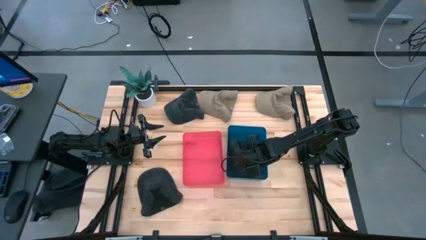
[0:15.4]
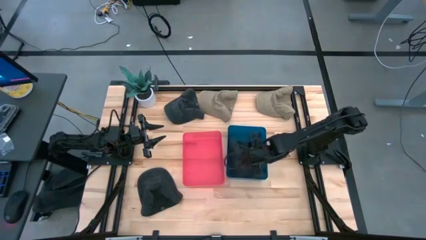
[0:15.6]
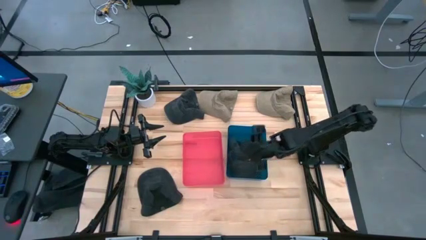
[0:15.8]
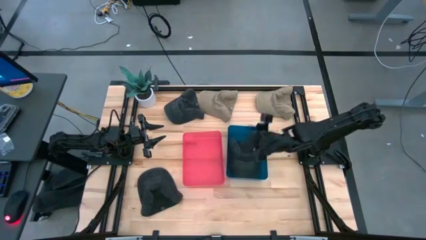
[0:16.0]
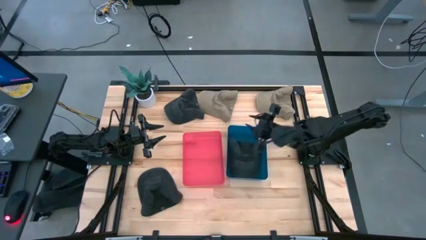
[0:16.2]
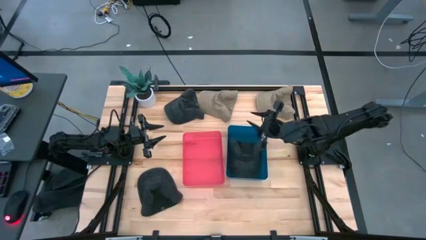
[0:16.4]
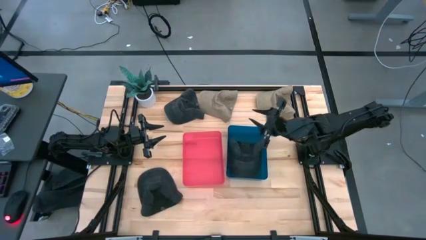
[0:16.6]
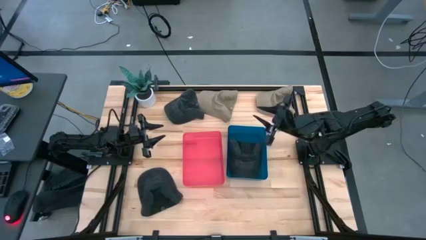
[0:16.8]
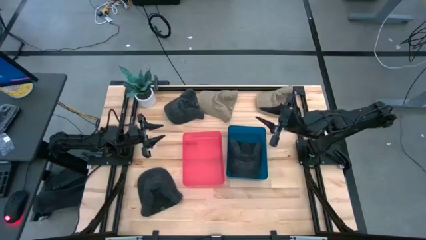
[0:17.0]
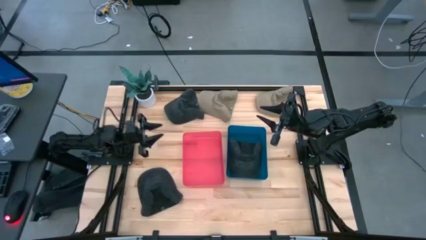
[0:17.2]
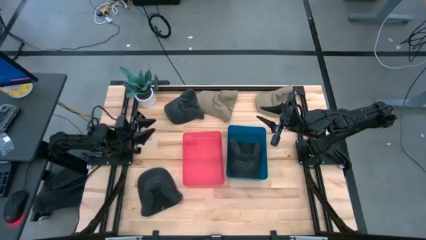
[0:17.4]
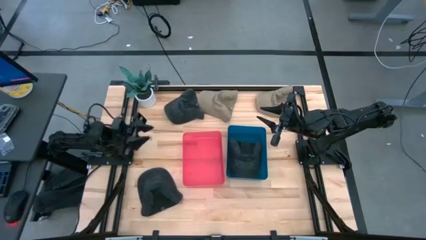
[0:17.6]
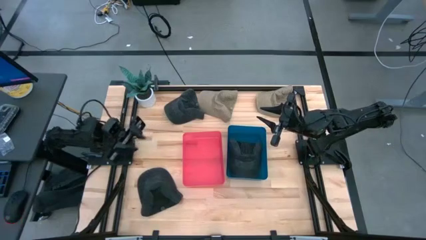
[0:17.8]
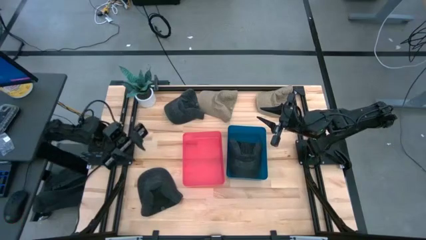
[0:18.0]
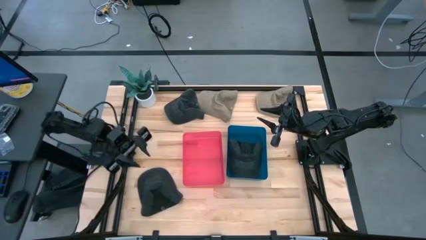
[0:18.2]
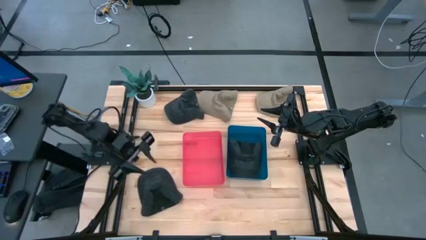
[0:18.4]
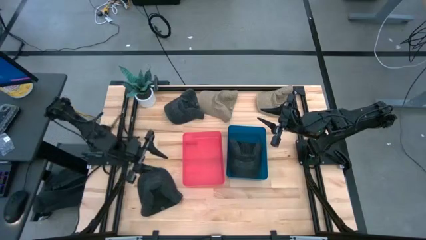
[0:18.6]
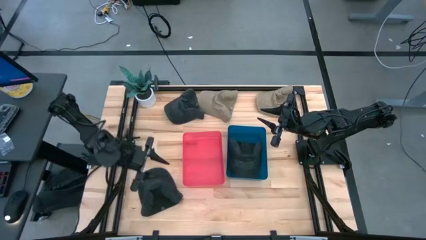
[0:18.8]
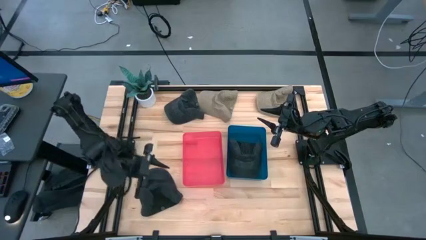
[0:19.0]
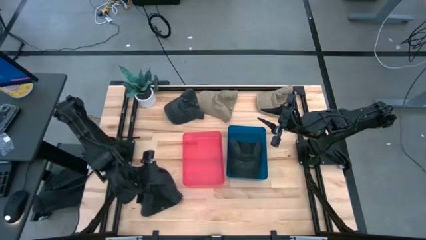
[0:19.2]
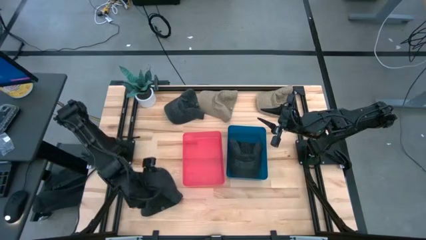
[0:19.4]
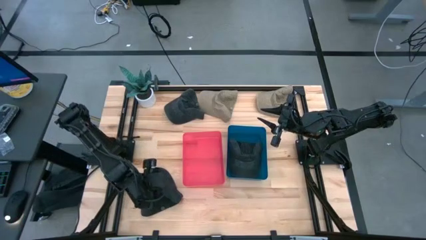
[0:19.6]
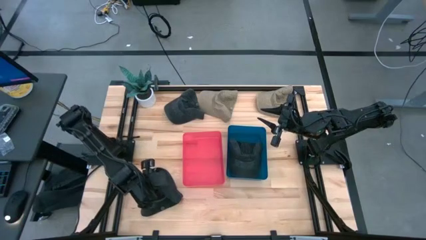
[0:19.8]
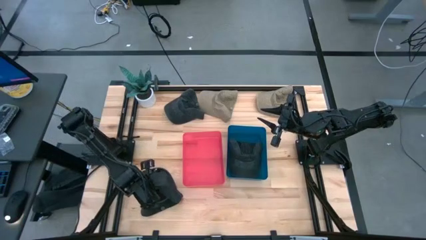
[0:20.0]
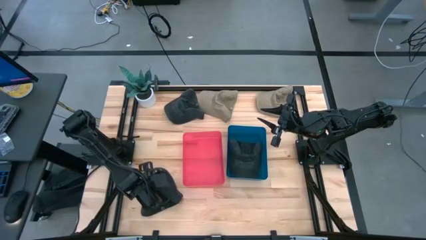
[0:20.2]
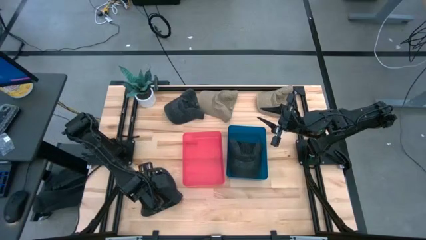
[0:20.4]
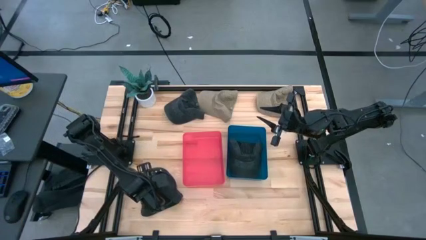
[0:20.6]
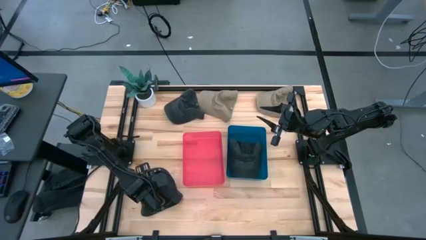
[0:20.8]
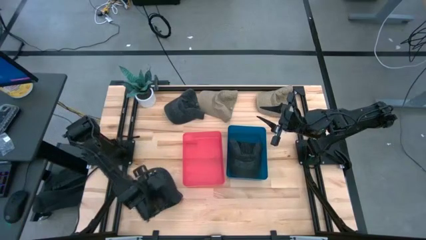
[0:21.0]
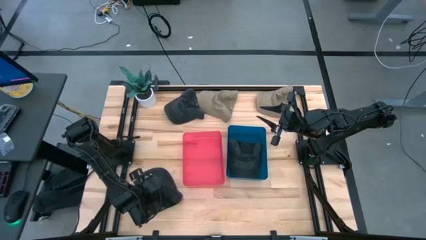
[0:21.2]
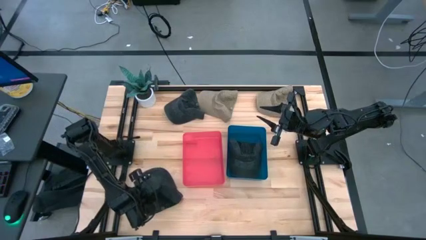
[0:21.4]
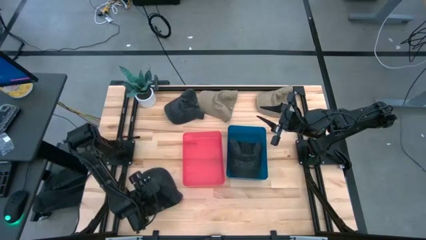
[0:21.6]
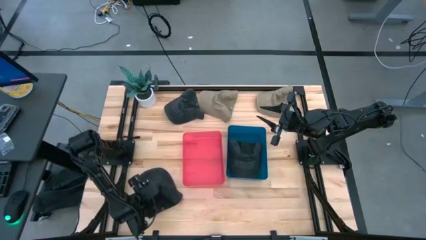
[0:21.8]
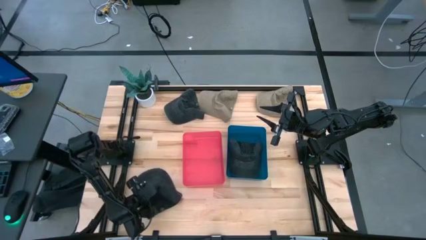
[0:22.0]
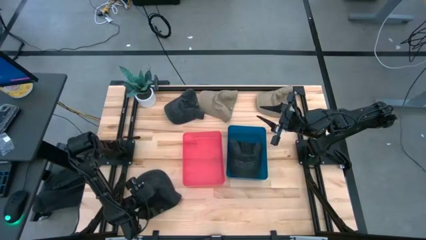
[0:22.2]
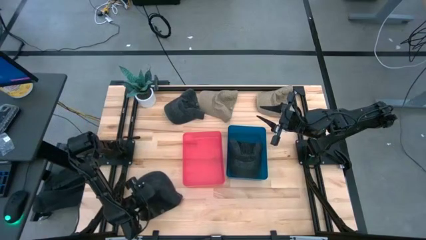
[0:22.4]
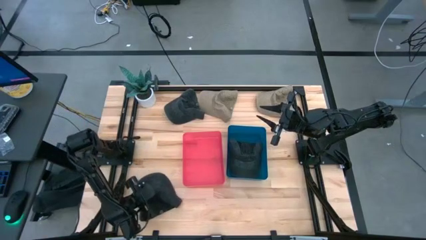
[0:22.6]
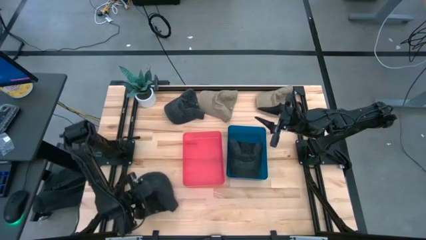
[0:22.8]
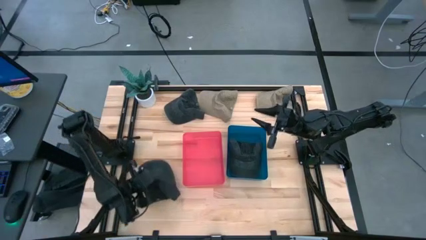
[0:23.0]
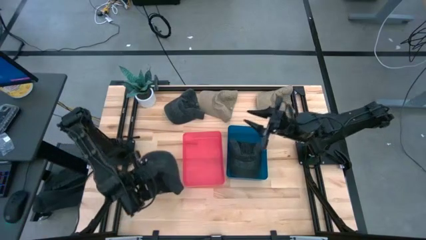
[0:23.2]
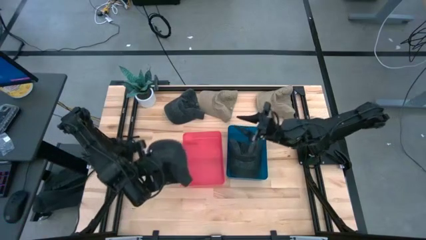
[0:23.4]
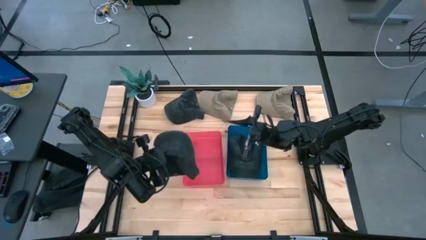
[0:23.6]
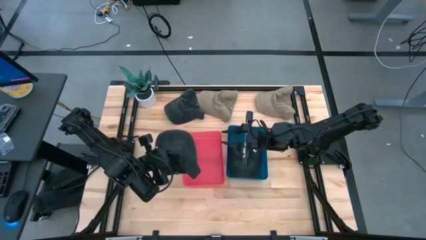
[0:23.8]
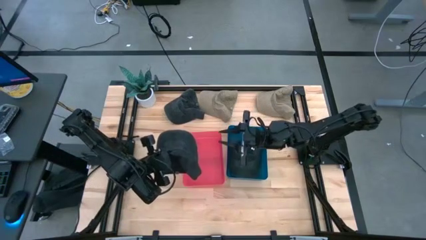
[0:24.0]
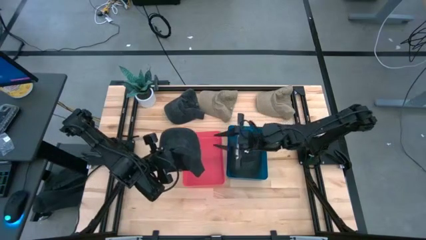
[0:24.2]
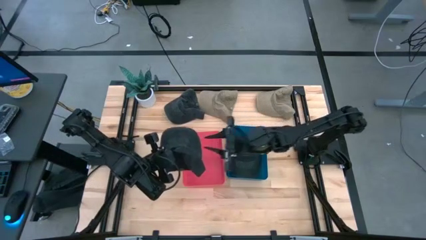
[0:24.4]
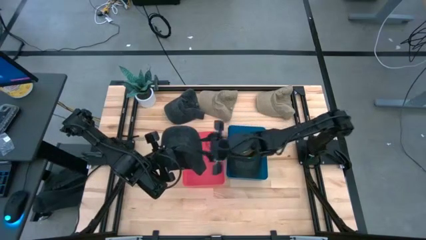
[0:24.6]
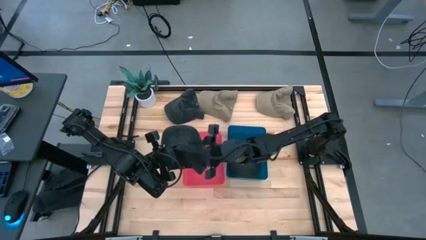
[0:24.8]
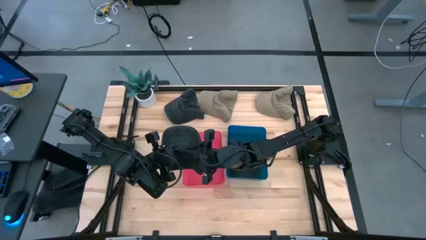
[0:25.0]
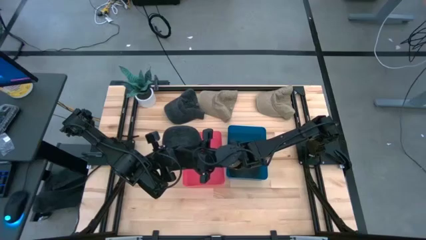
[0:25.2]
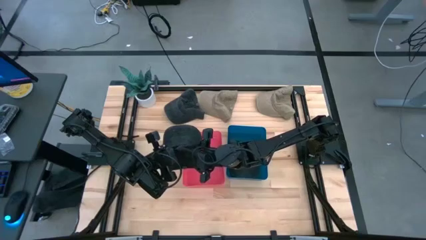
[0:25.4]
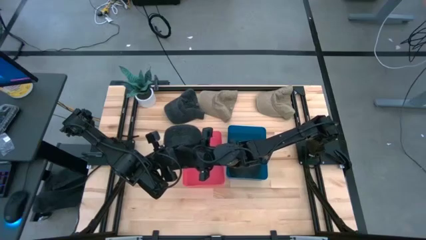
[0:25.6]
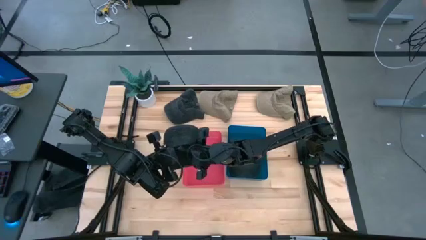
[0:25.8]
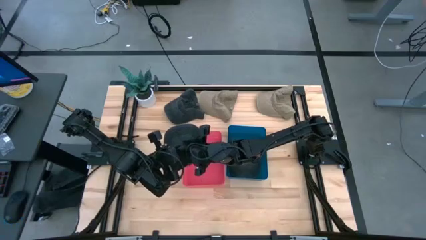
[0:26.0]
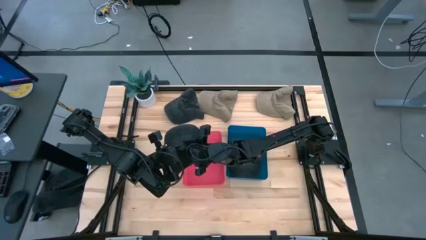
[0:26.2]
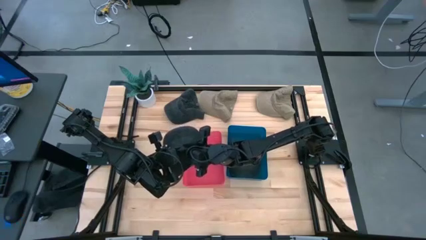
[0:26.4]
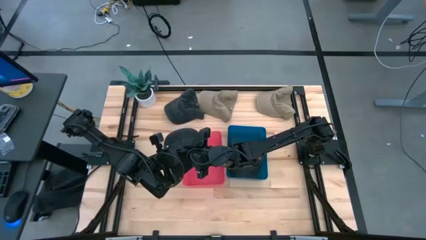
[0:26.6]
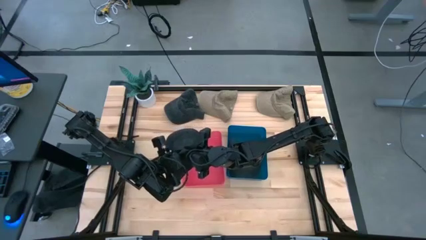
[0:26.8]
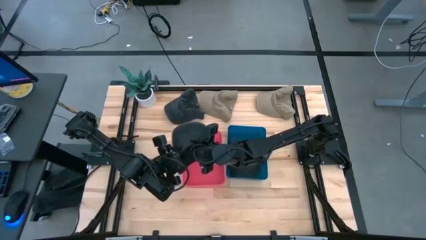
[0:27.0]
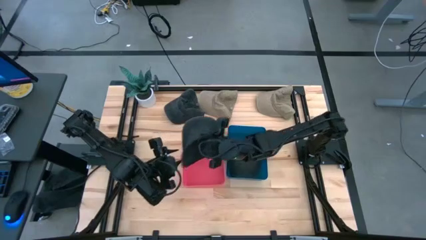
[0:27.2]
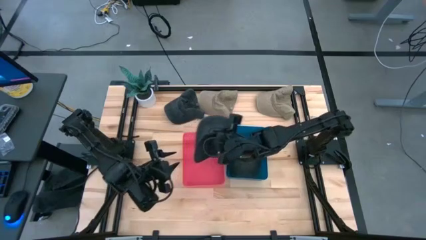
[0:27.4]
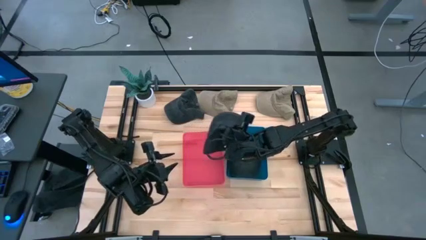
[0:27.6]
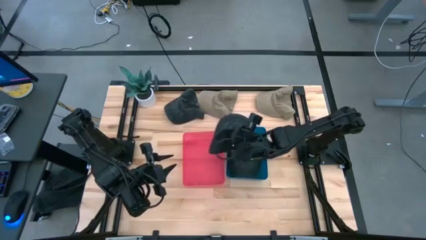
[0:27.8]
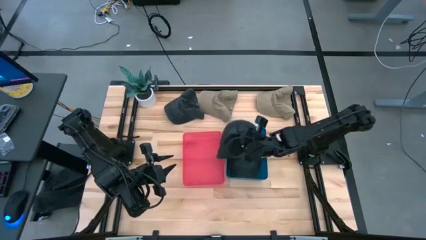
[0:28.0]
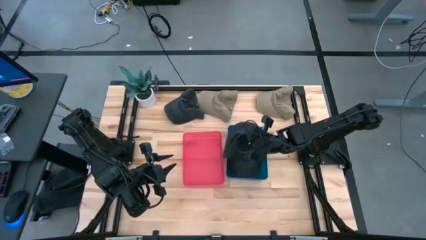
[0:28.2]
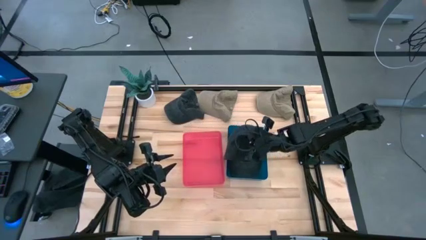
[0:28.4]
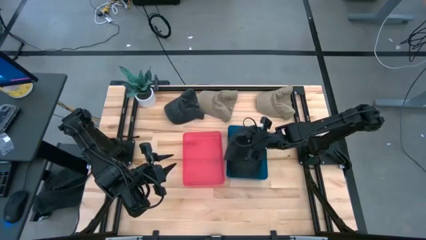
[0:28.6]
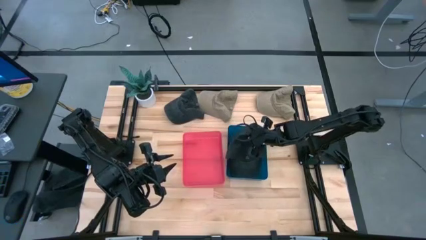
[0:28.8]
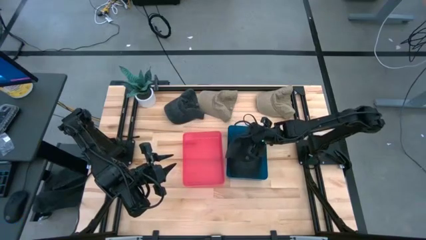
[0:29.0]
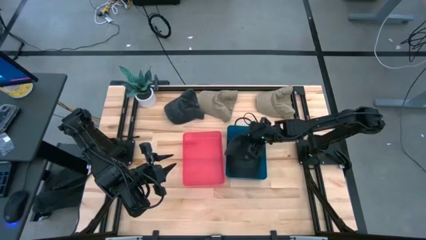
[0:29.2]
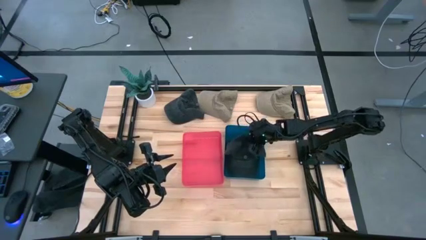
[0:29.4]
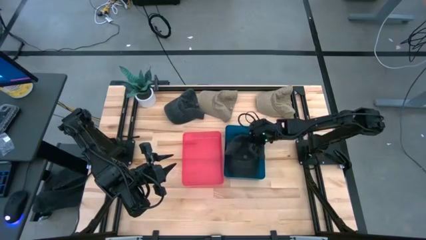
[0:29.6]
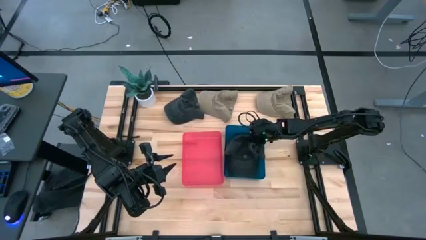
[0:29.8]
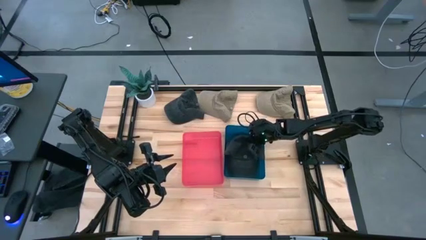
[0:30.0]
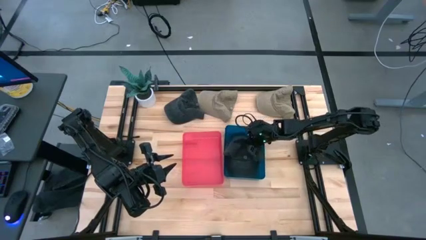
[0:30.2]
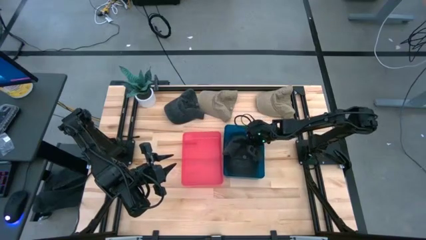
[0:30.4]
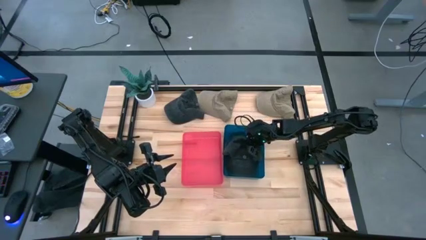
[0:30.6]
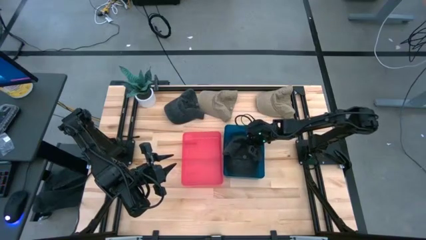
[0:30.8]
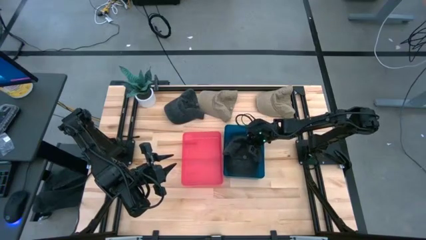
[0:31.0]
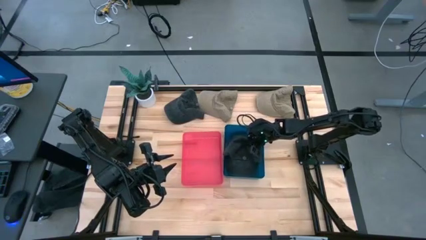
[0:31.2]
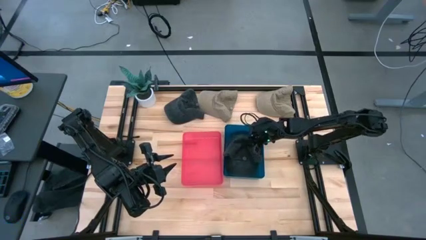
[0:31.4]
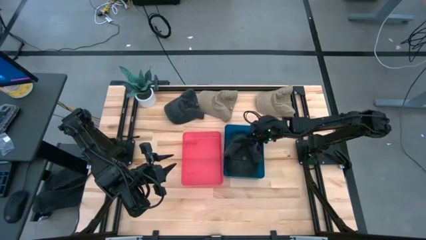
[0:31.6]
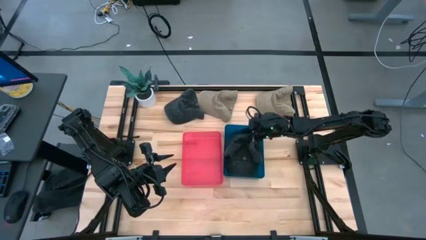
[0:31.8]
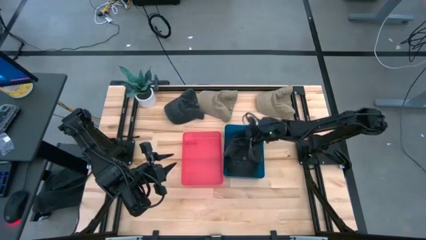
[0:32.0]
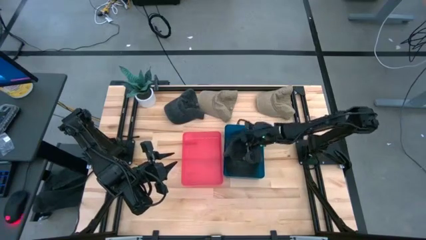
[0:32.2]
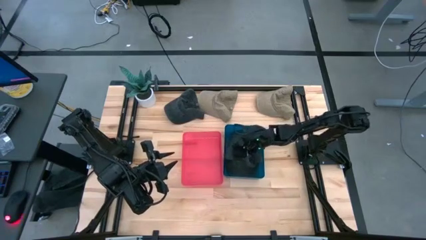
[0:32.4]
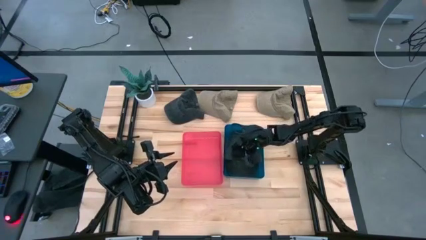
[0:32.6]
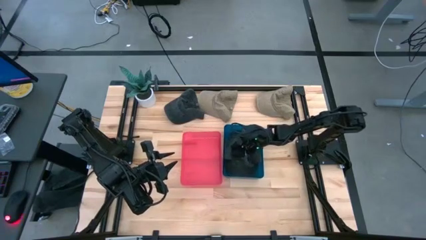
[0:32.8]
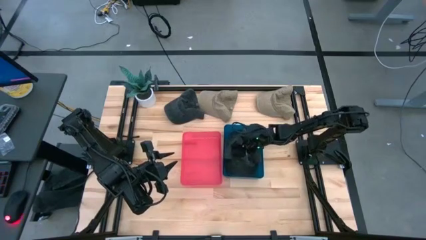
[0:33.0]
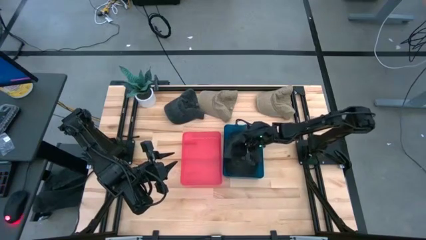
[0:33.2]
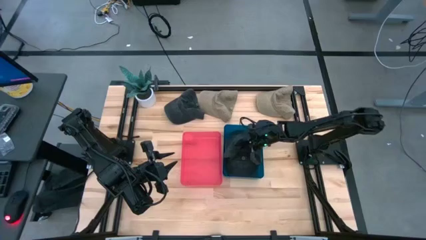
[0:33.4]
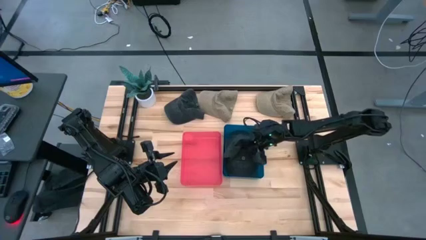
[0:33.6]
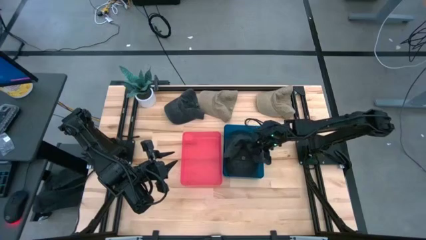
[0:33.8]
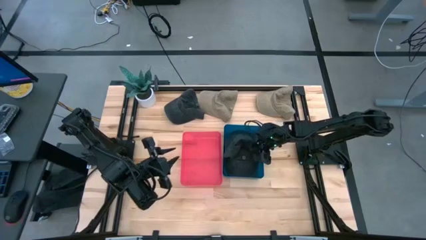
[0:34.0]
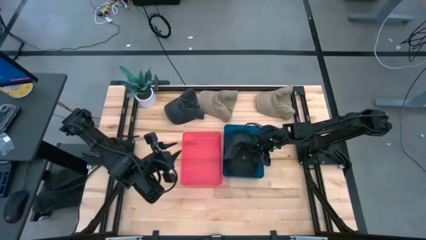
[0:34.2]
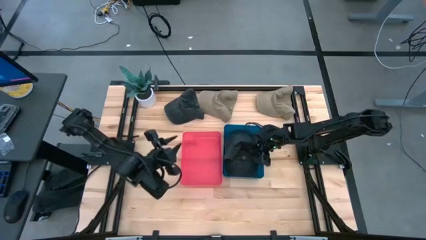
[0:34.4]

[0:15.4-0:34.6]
Task: Pick & Place hat
Put the bottom black cap into the blue bin
